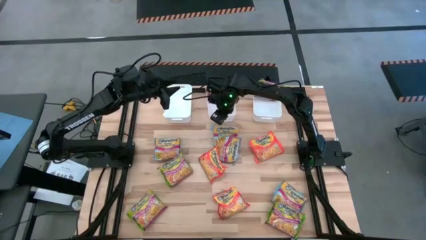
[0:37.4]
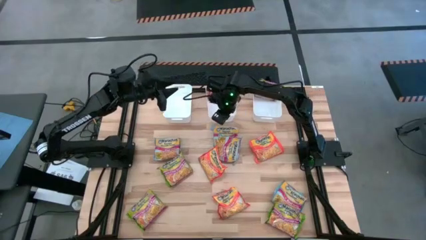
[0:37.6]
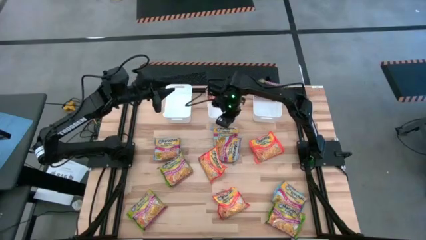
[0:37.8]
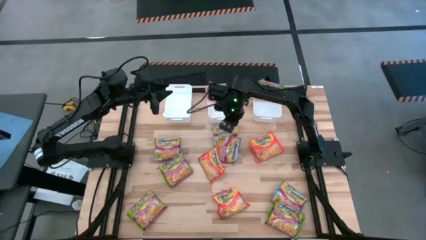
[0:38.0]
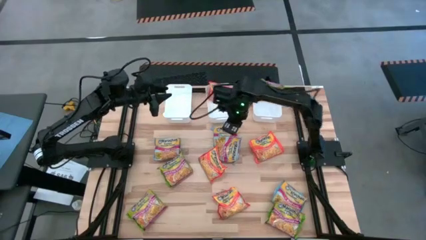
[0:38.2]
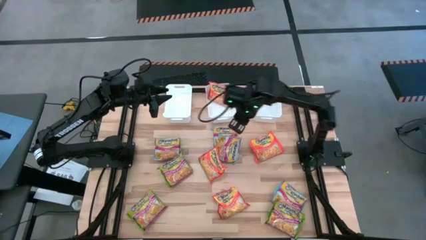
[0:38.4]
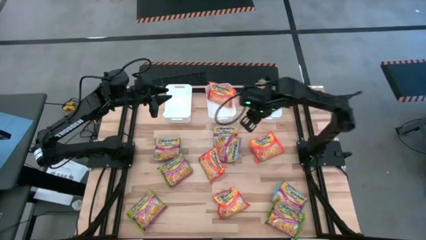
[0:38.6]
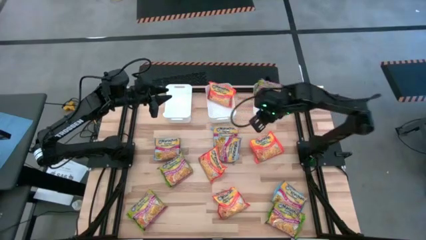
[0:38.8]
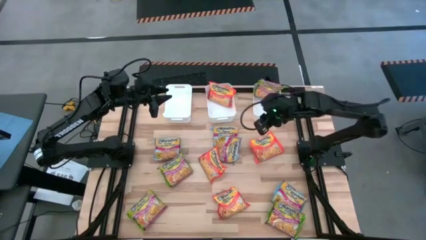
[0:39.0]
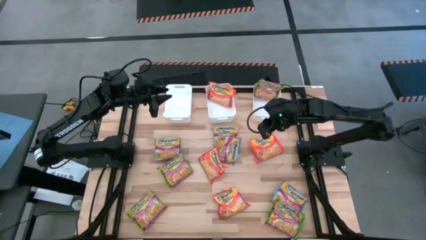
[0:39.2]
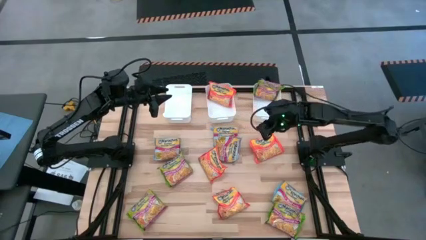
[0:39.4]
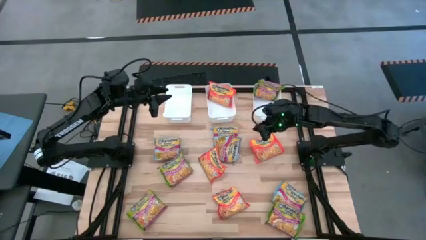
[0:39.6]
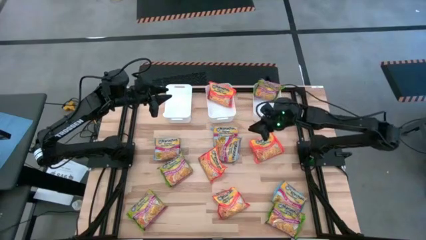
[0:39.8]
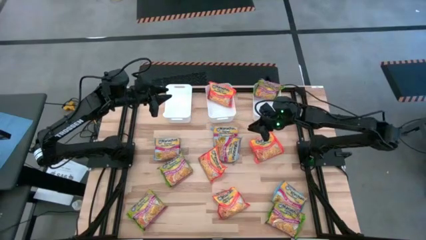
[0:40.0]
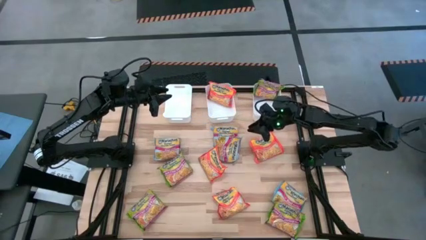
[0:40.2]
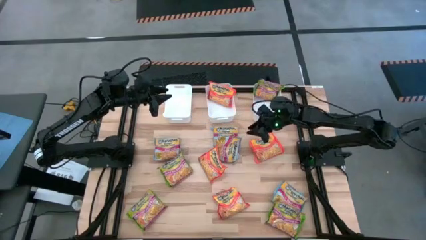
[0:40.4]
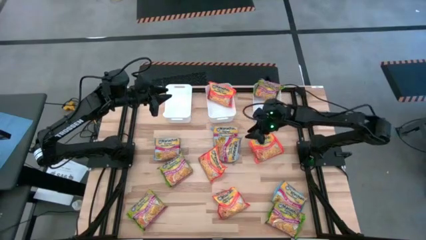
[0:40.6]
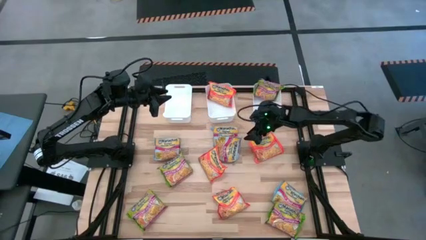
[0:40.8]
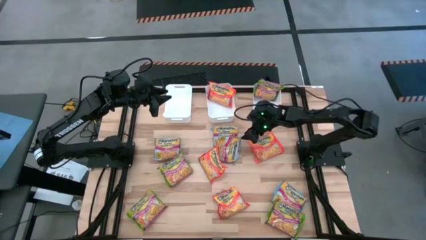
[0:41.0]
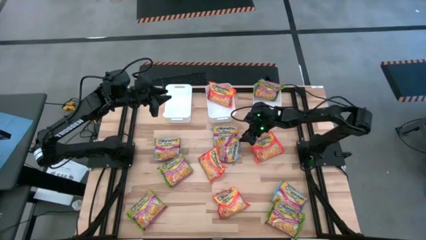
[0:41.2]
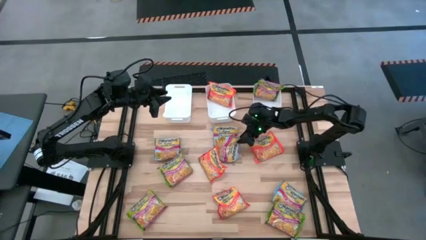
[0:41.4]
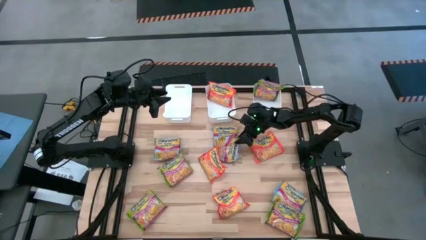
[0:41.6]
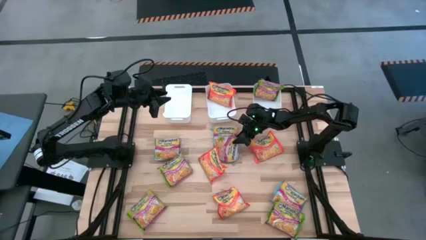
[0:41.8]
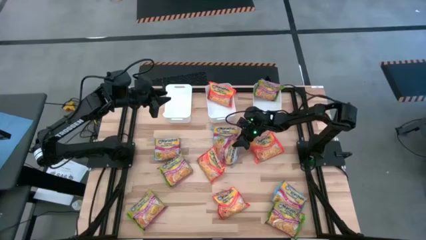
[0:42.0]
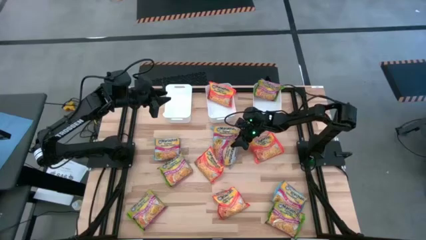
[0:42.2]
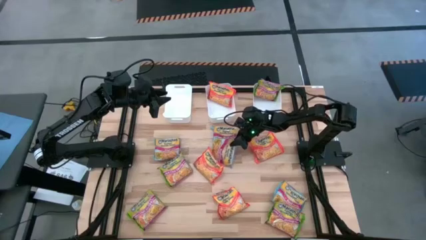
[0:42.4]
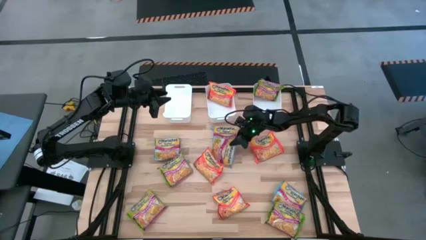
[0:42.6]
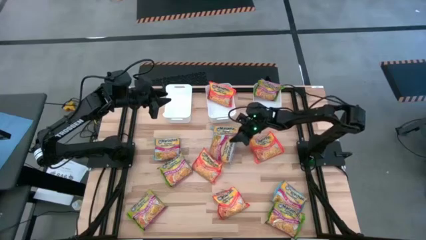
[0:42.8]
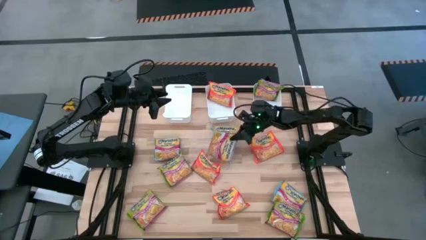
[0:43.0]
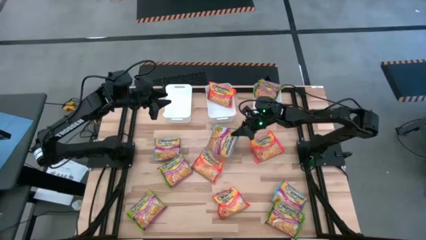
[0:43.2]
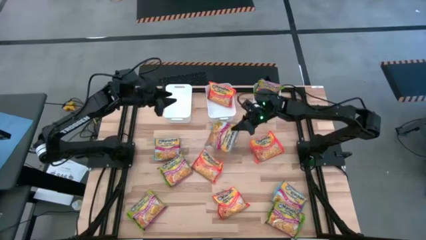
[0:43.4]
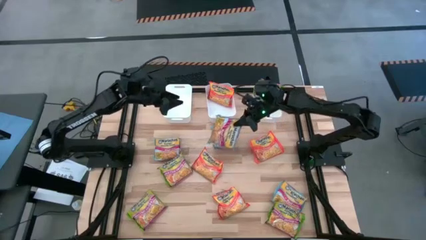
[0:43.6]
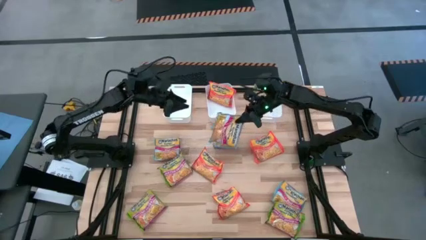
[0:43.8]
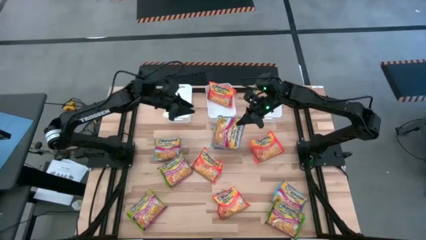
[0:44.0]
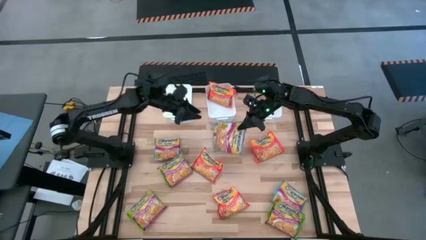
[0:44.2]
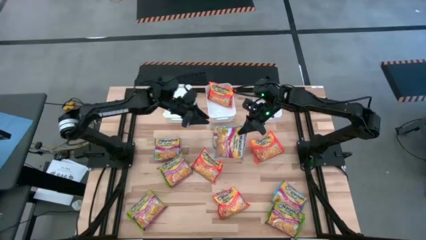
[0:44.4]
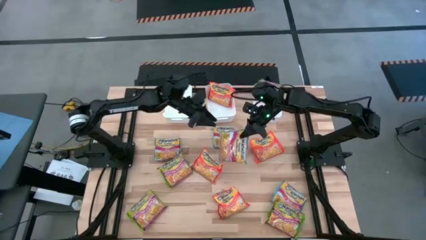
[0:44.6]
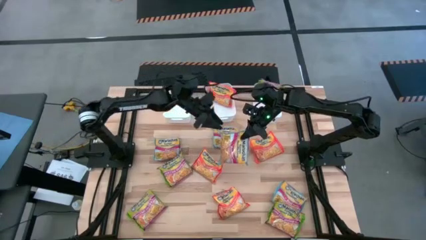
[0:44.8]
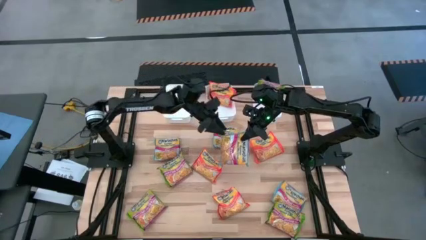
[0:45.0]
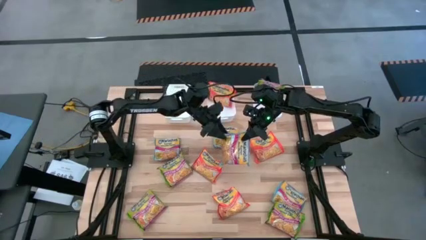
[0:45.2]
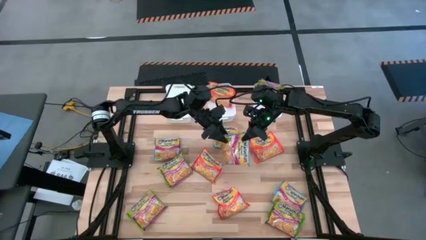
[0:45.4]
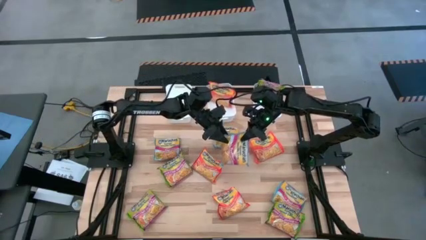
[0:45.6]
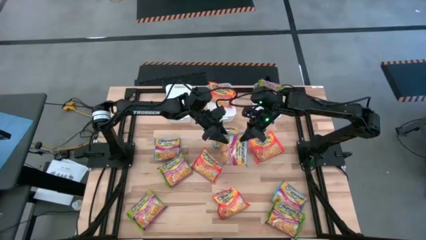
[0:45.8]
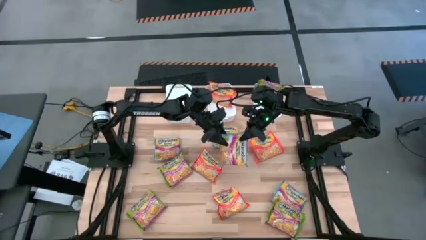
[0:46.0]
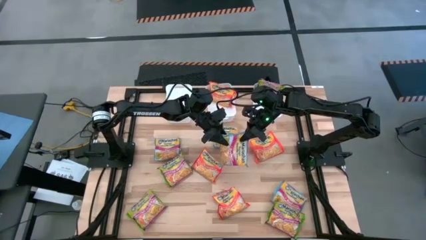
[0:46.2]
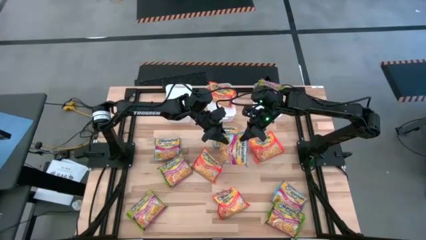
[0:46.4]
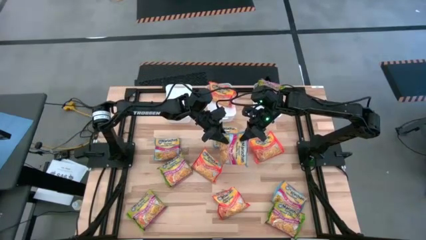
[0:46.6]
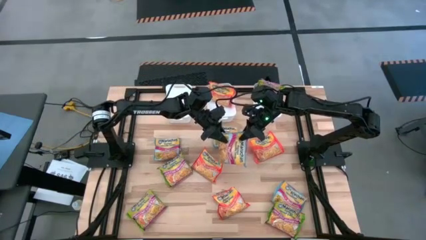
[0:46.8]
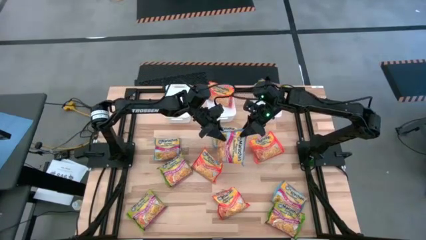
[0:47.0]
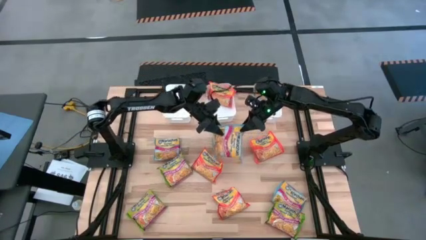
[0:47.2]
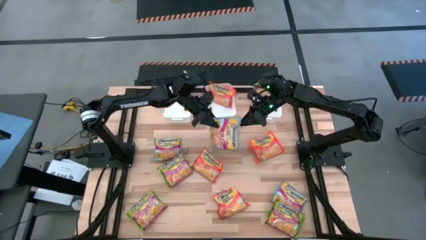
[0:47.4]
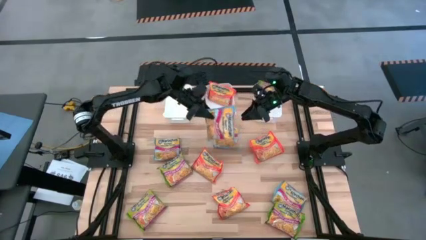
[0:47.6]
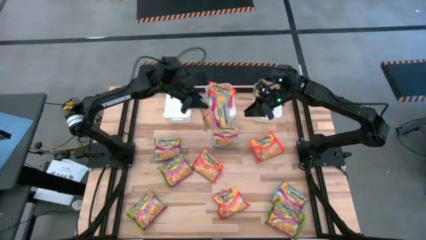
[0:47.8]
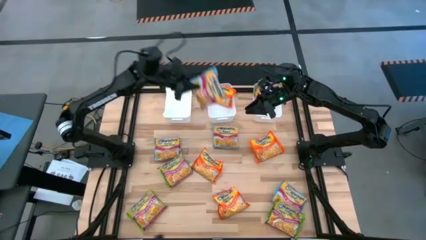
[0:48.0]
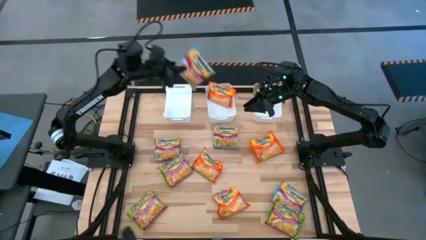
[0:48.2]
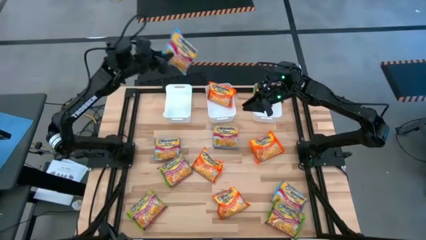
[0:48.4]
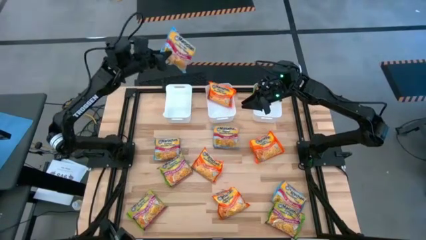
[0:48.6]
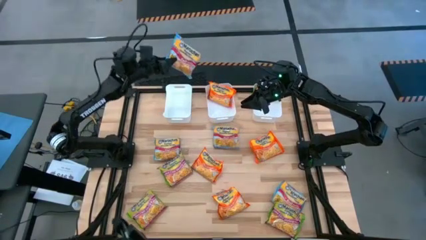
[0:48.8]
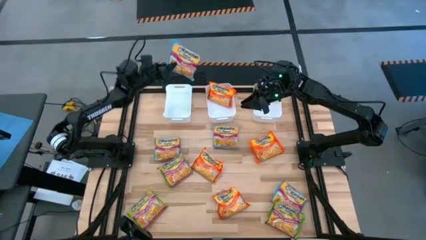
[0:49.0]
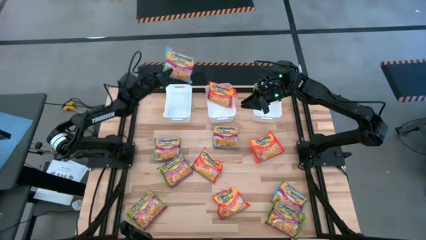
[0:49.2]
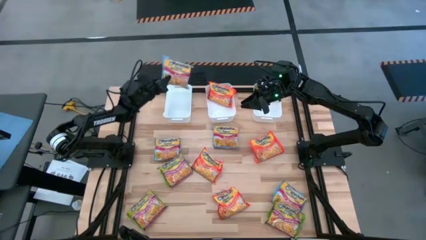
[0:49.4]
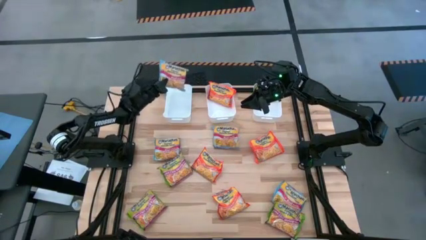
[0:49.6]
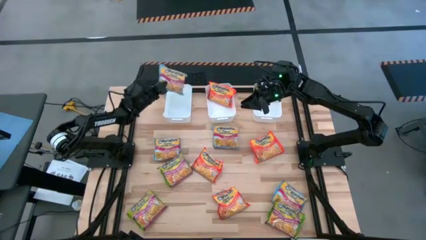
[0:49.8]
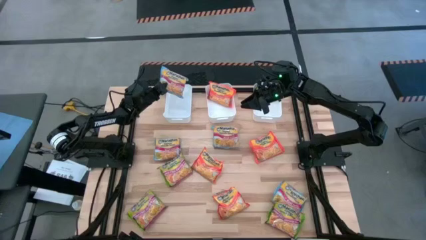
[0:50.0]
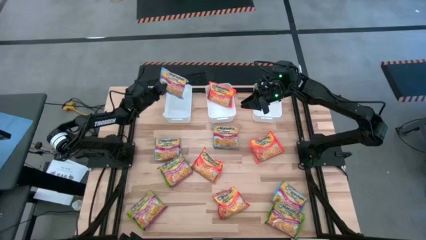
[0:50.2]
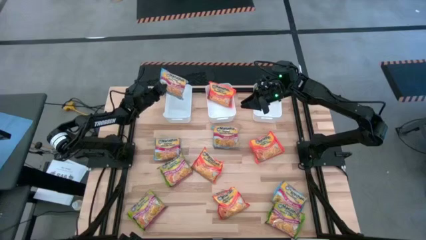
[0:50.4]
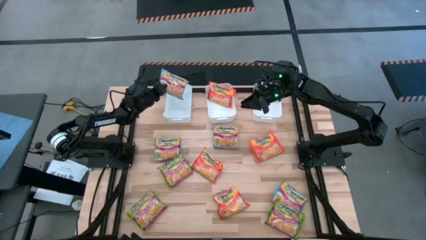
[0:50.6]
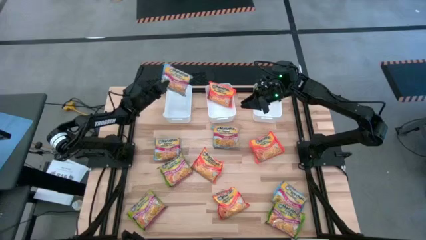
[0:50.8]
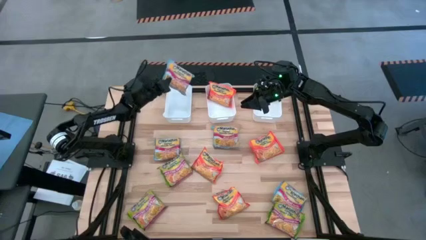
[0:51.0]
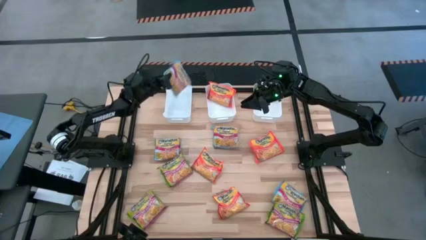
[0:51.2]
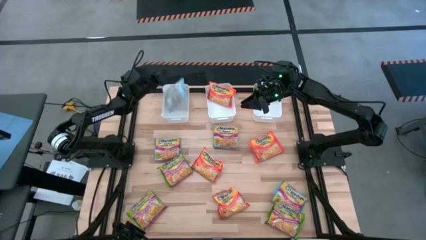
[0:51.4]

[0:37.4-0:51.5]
Task: Sort Maruchan noodles
Put the blue noodle pack into the left white bin

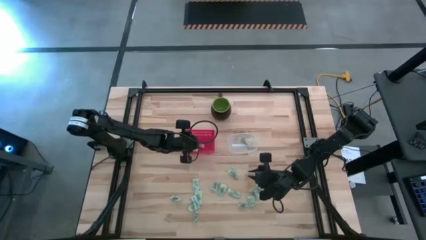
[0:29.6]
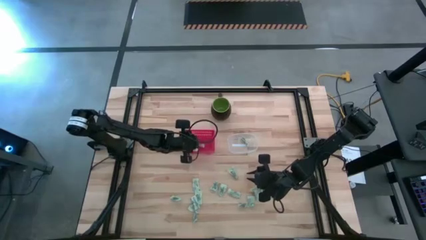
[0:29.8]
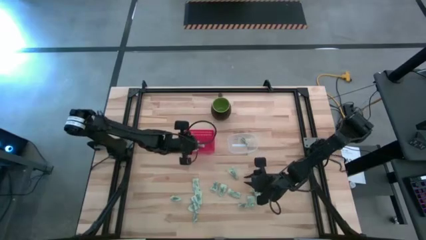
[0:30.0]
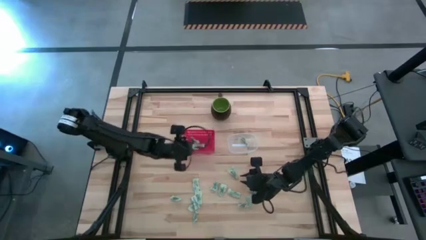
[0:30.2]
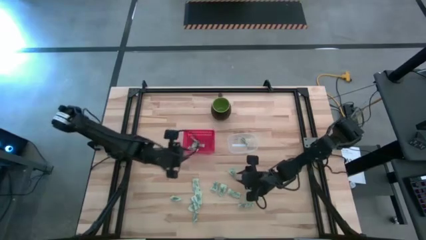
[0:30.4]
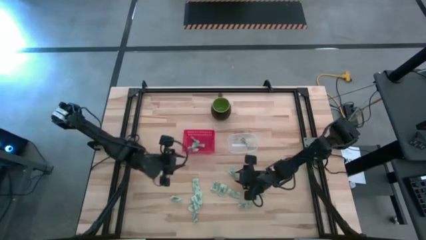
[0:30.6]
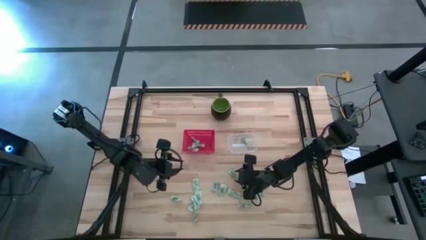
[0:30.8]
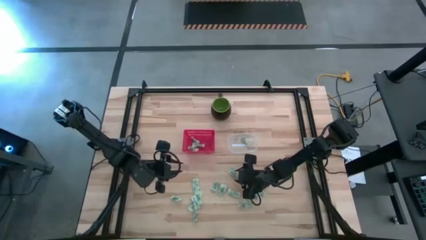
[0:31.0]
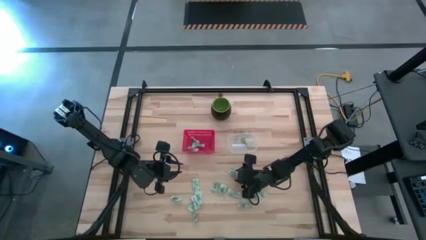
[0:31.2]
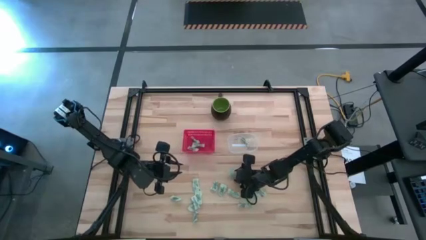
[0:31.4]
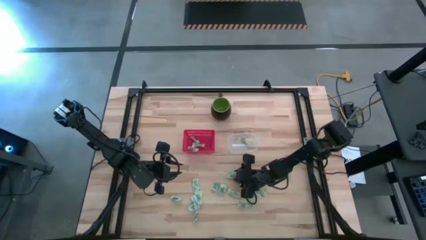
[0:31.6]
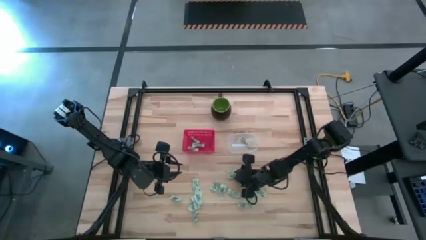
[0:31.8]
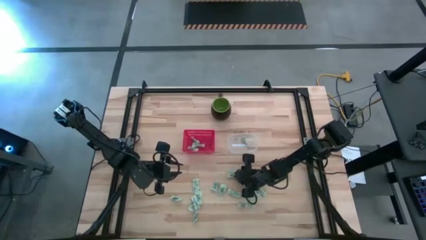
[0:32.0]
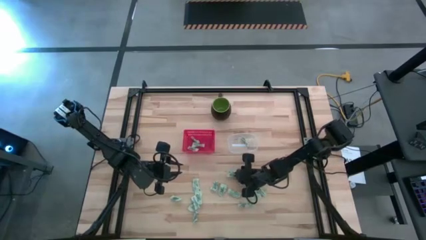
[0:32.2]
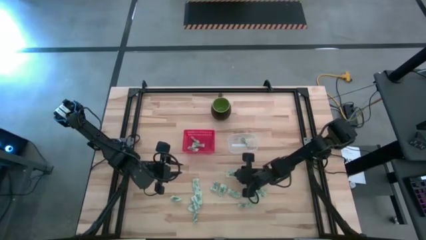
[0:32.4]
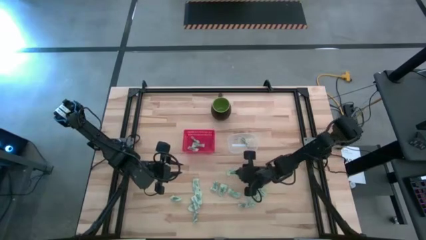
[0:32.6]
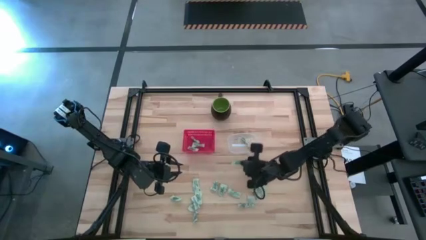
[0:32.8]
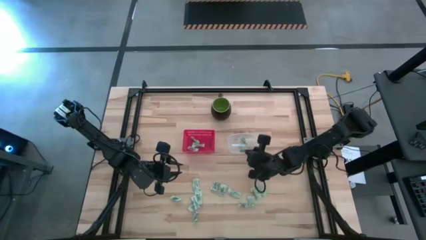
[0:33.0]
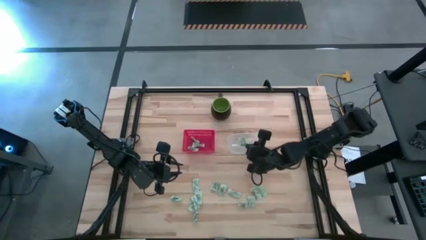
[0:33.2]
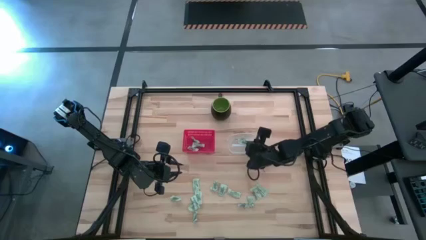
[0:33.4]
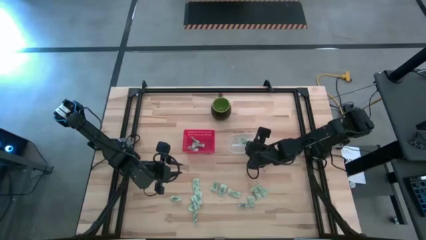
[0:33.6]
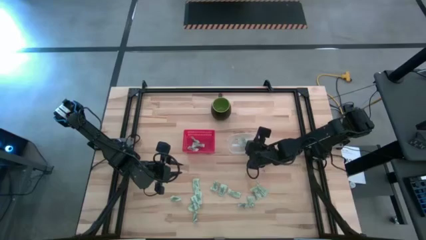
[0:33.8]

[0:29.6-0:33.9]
Task: Pick and place items into bin
Put the stevia packet into the transparent bin
